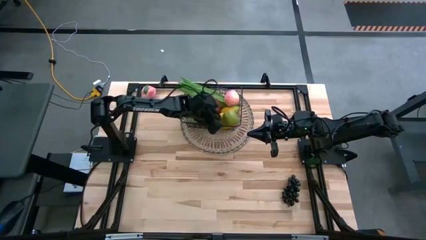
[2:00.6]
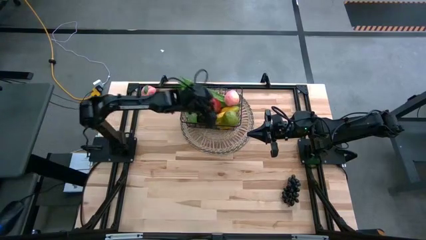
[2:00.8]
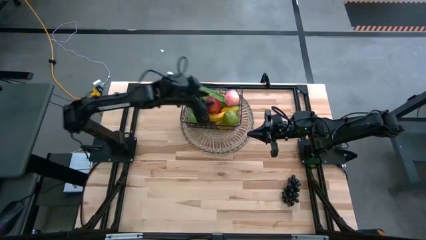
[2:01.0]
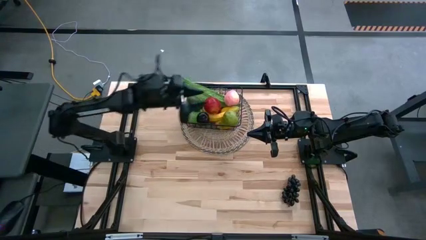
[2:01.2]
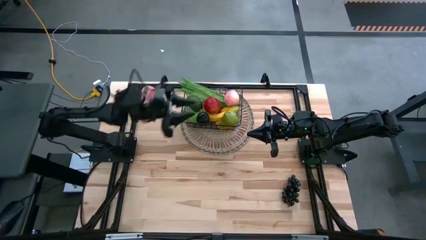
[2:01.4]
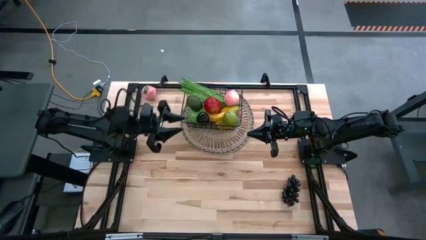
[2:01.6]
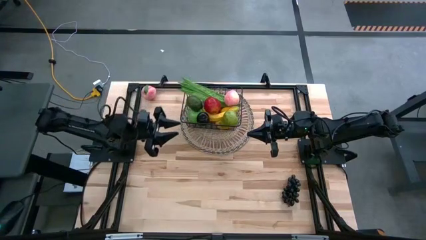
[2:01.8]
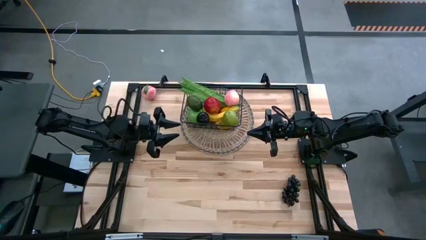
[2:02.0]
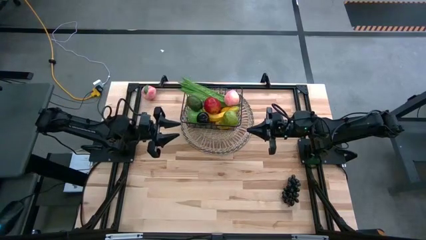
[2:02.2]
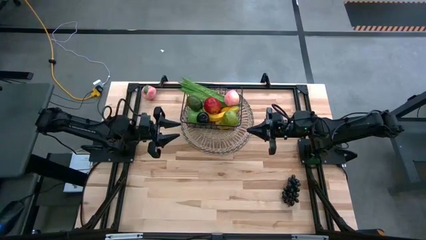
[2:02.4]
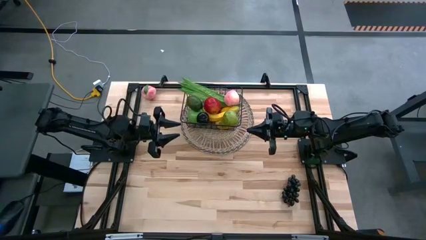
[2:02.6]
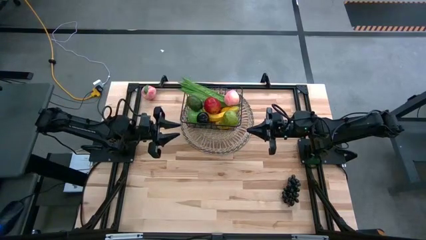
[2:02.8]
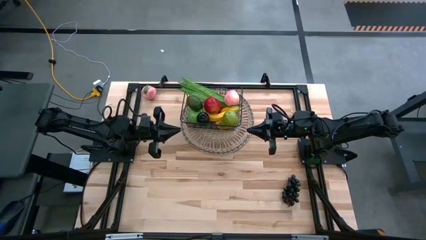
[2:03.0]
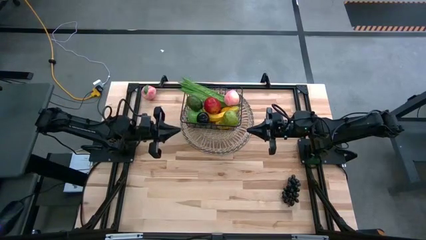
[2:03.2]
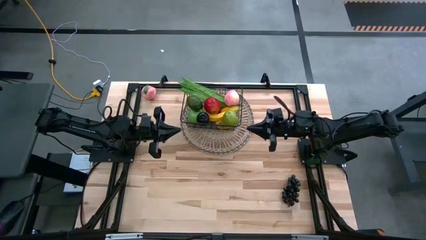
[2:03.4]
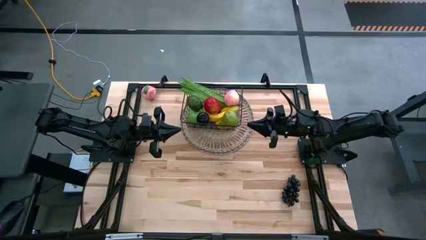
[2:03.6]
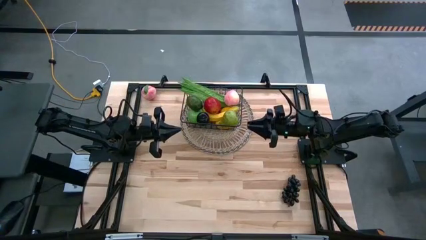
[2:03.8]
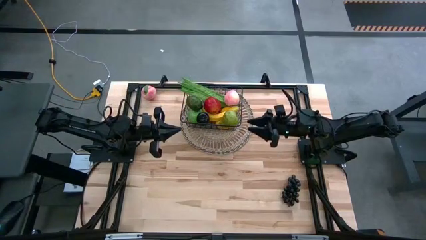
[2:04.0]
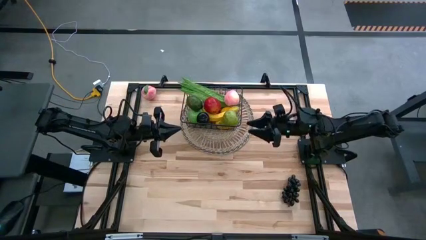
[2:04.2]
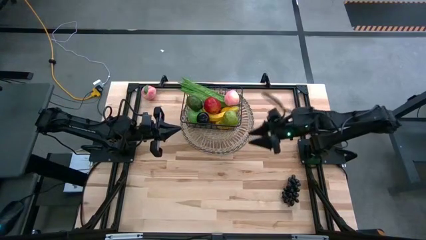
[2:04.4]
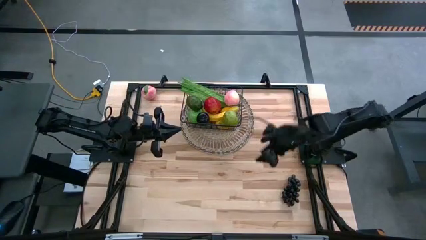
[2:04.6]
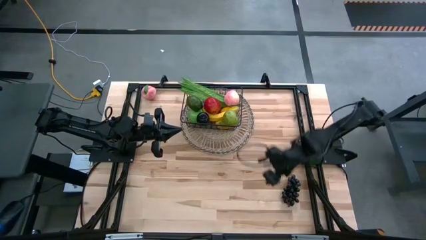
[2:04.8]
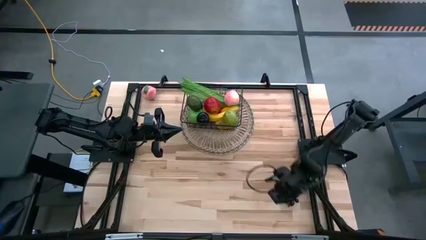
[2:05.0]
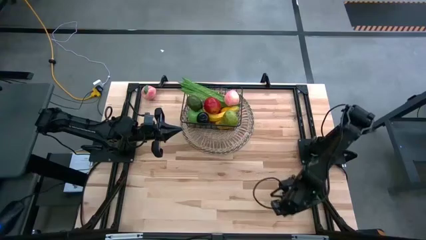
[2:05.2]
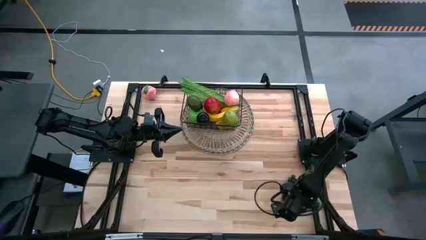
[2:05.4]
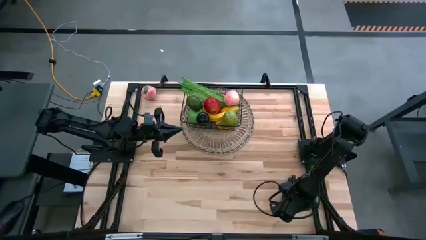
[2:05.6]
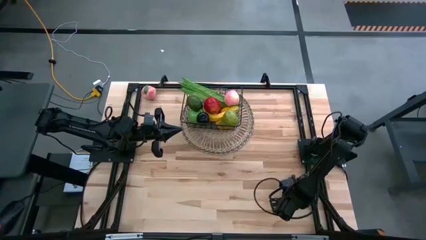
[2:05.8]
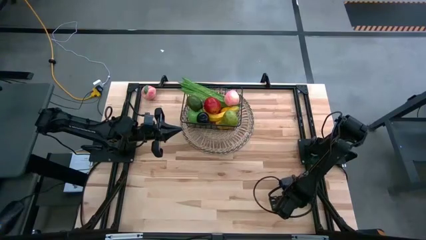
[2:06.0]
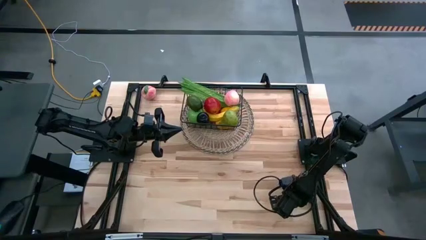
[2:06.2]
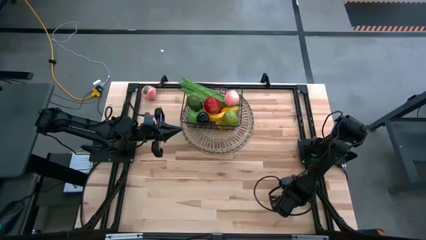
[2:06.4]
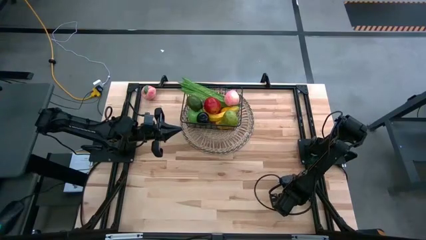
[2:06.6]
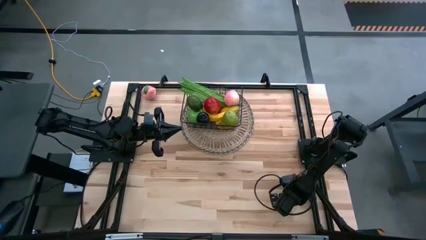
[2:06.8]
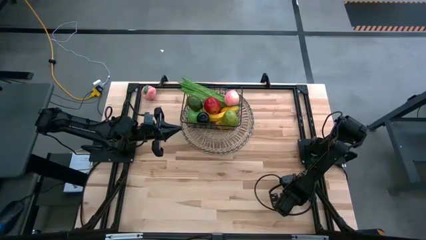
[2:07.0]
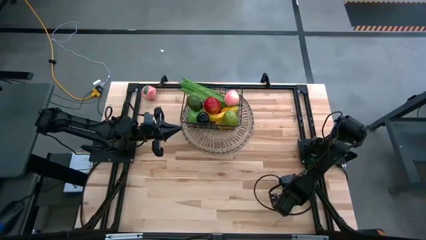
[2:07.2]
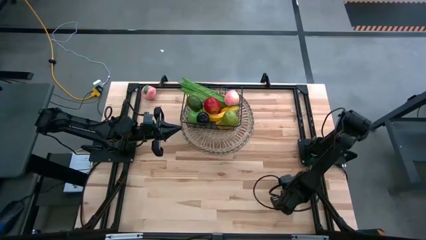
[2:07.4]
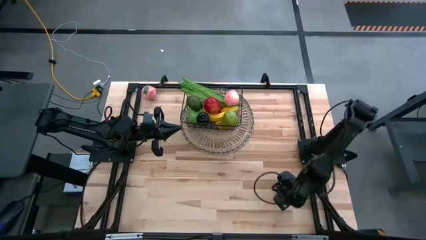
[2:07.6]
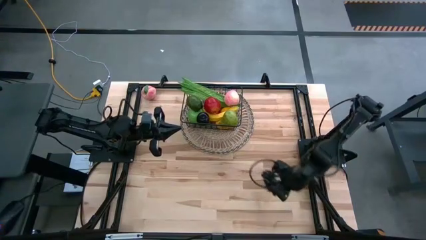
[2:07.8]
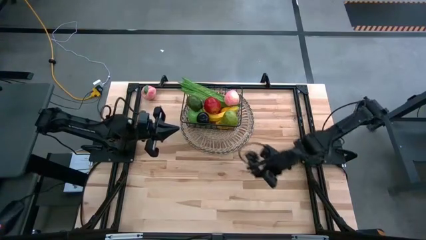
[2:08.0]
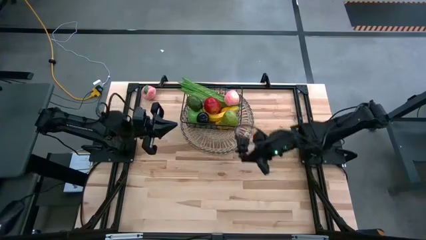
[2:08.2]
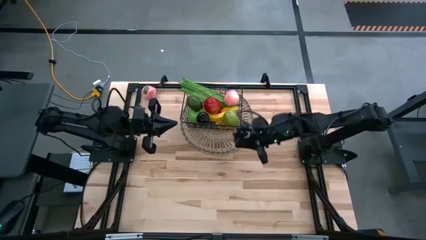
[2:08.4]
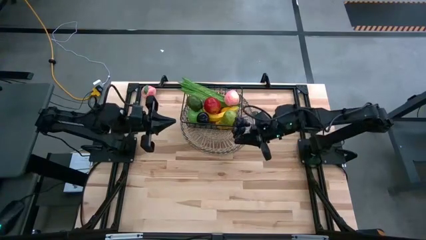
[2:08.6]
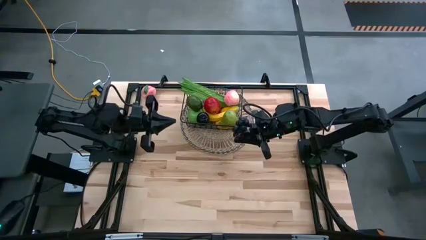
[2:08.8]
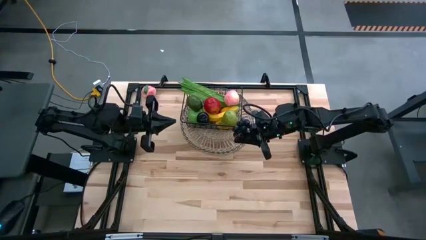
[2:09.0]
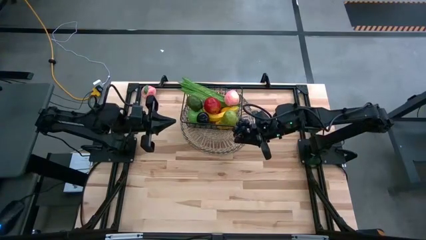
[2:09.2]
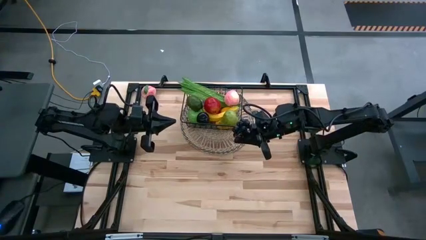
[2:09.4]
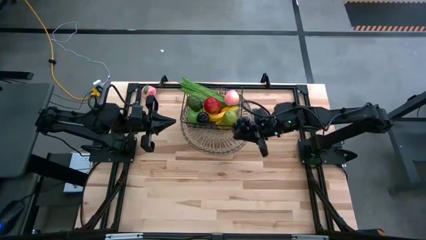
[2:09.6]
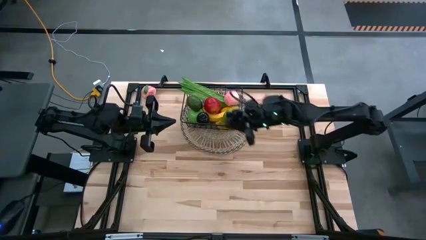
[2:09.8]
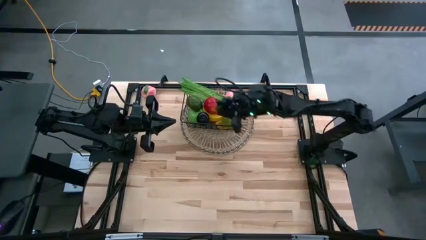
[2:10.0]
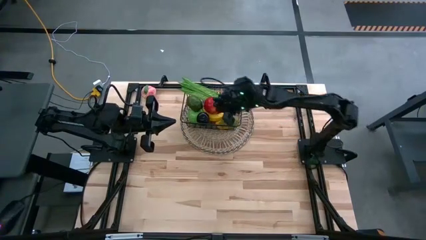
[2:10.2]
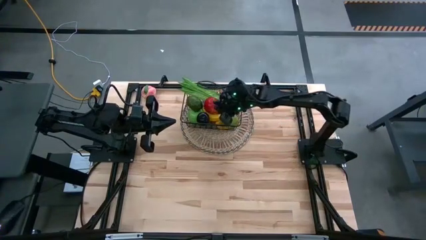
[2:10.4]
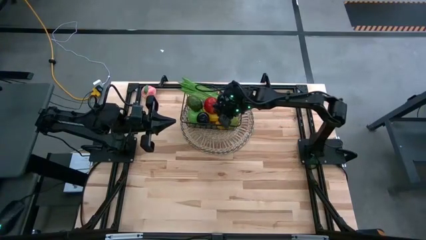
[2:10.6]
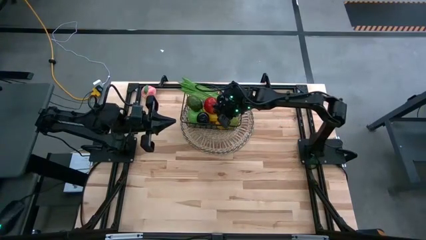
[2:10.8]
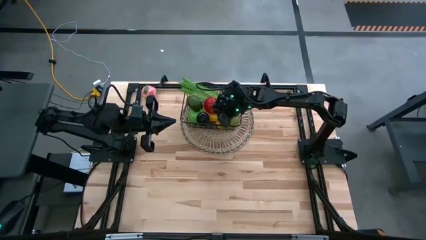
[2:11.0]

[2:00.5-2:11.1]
Task: Build produce basket
Put the grapes into the black wire basket

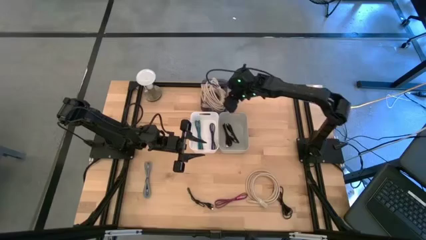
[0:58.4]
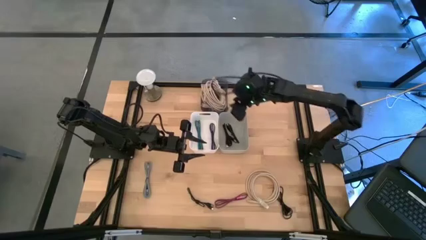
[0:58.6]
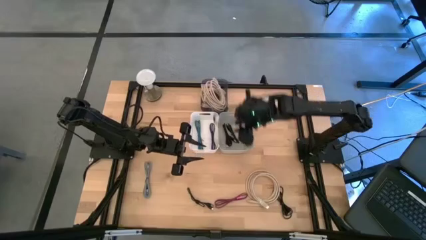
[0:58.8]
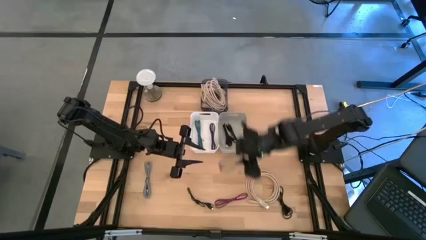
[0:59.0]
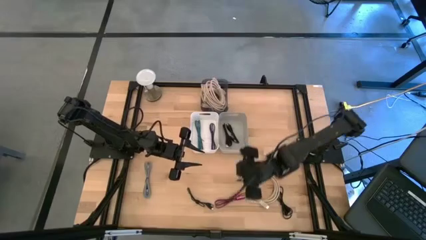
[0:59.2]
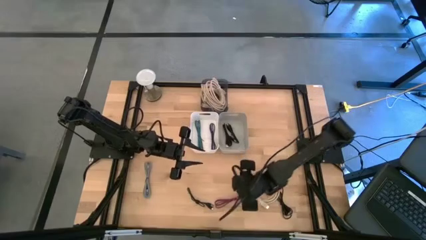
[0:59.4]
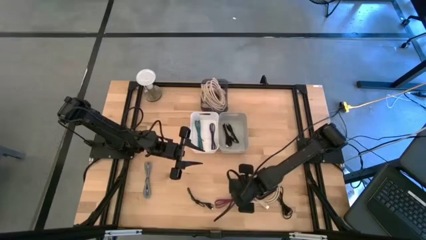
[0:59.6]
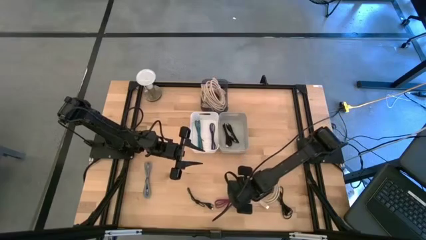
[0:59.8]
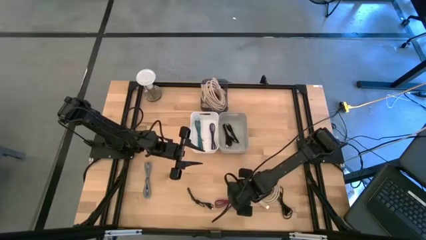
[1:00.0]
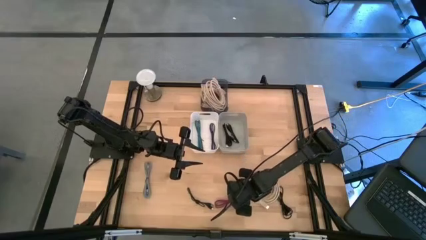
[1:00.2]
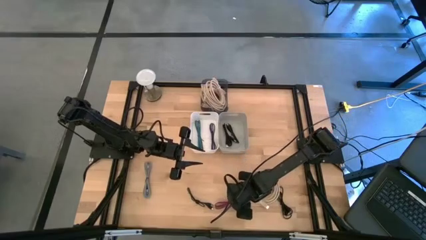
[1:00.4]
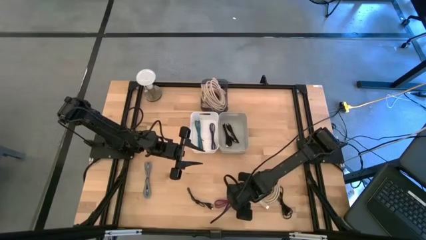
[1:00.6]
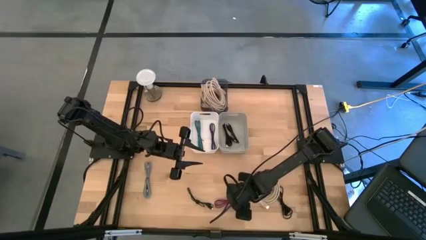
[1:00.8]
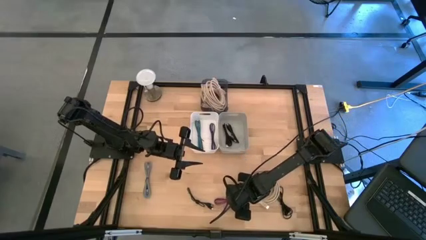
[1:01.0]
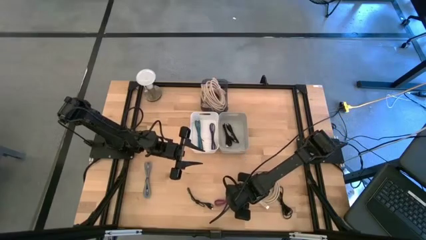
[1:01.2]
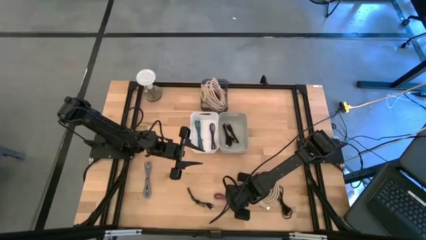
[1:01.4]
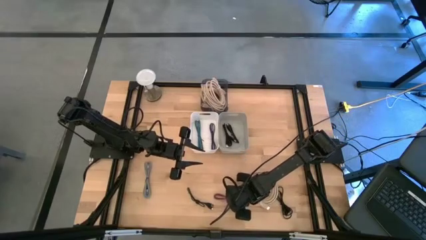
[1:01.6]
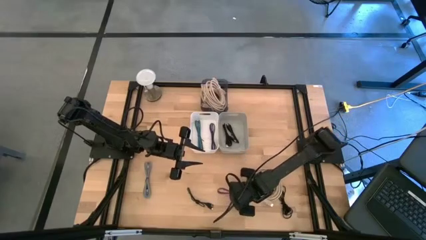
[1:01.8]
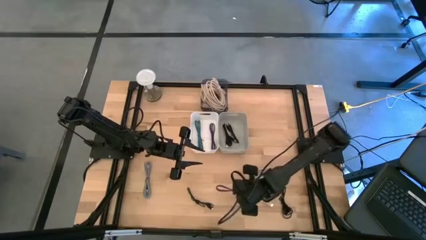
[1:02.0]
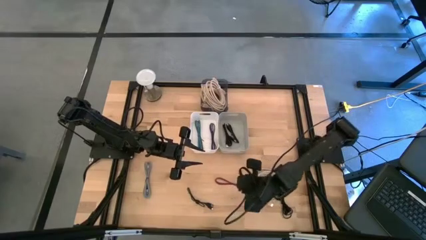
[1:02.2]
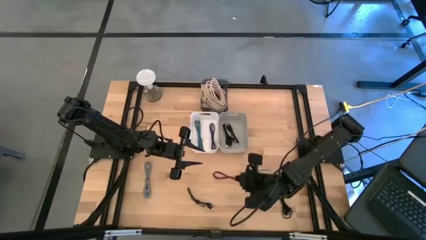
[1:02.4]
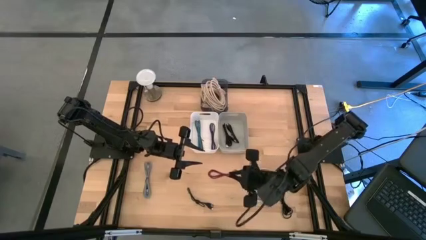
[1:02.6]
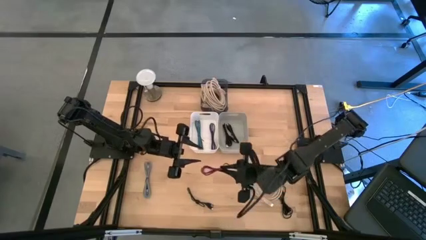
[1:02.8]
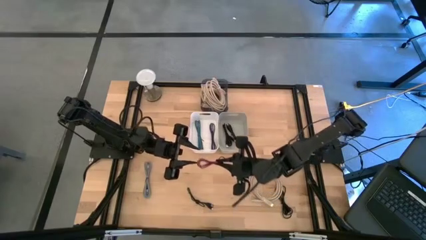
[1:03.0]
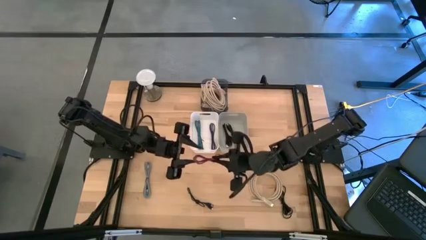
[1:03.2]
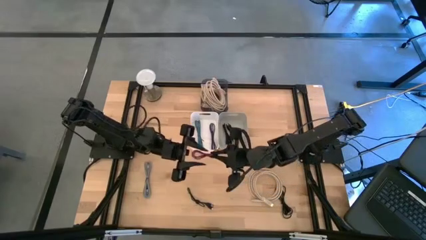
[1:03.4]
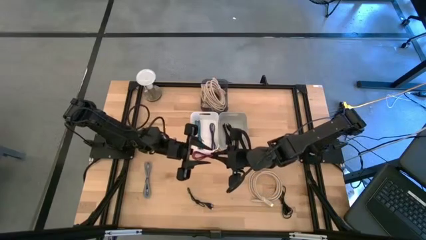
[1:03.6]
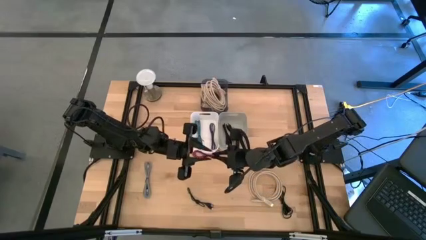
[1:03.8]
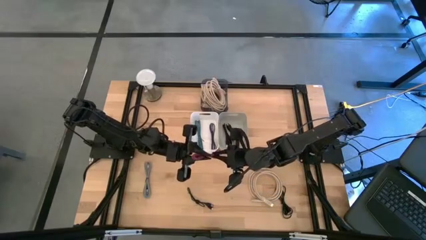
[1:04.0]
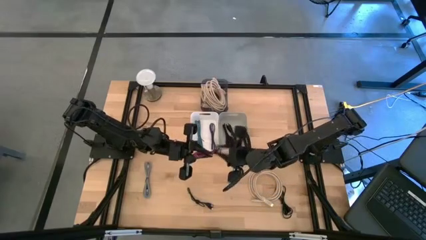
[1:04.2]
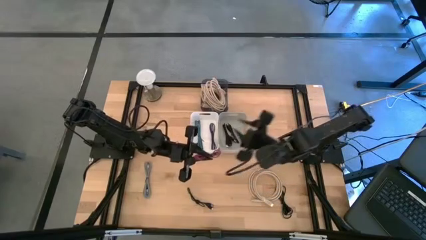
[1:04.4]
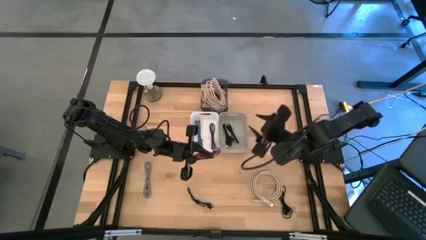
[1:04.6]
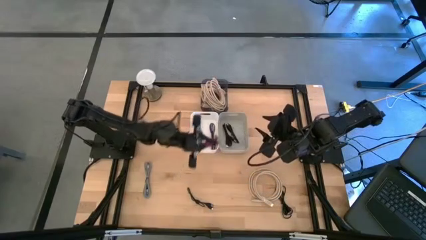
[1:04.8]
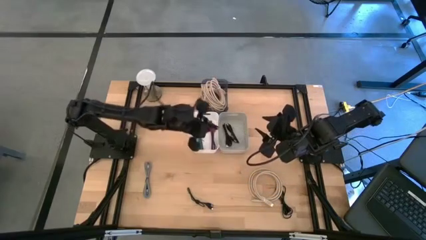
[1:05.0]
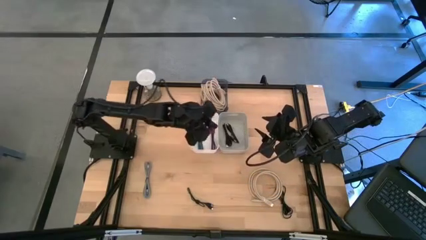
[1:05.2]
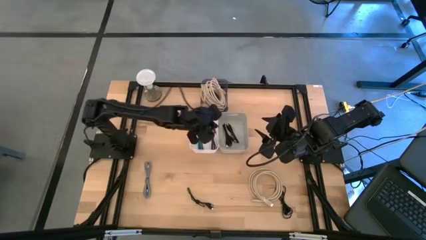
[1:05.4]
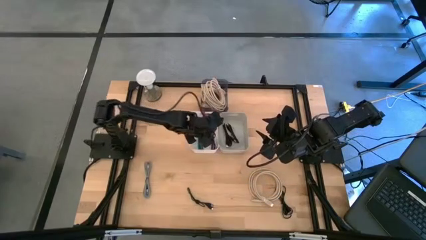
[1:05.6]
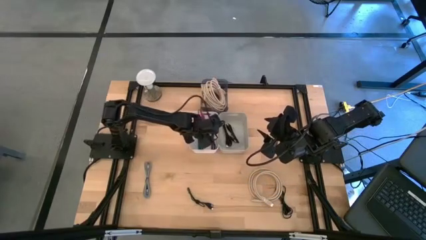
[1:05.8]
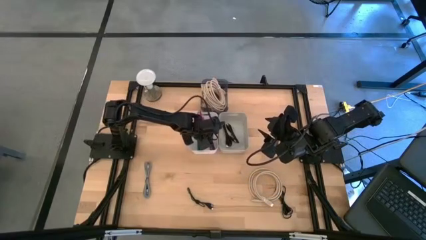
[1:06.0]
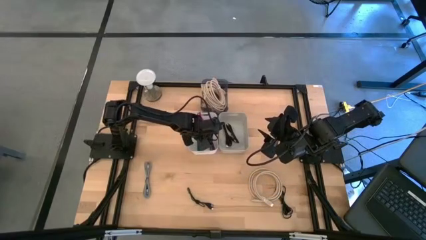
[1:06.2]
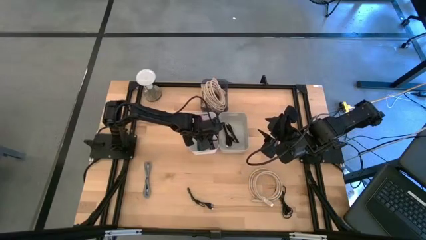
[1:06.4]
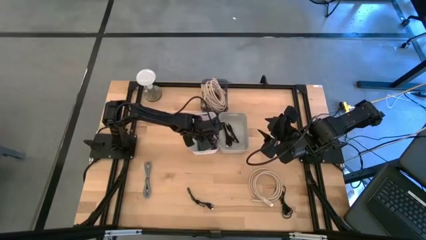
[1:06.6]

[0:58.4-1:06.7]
Task: Pick & Place USB Port
Put the pink and black charger cable into the white bin
